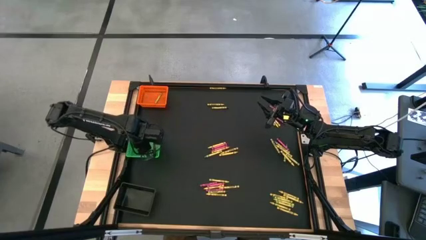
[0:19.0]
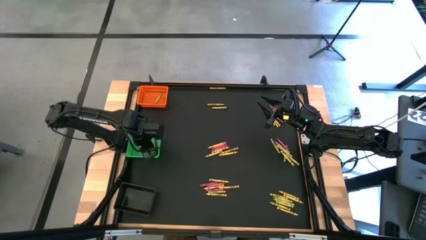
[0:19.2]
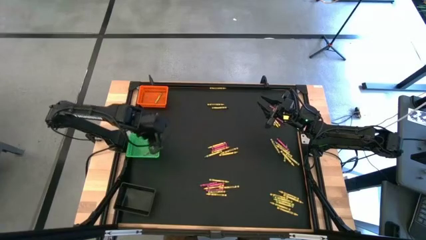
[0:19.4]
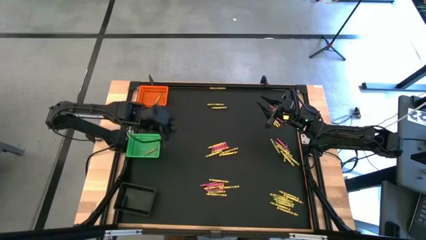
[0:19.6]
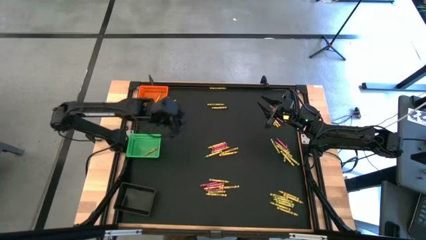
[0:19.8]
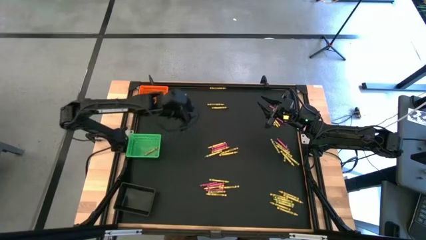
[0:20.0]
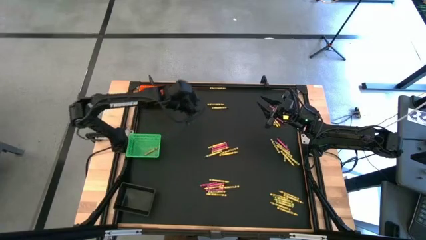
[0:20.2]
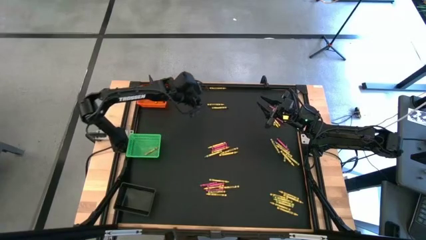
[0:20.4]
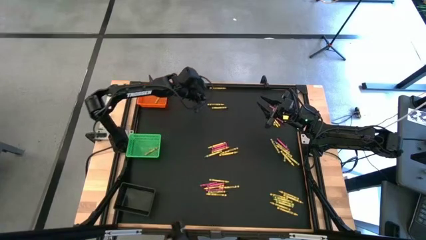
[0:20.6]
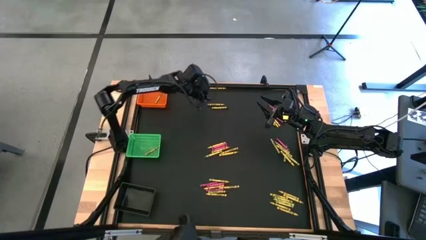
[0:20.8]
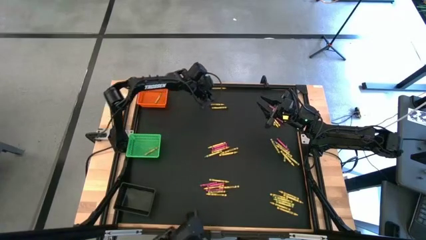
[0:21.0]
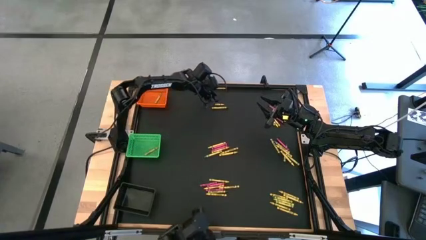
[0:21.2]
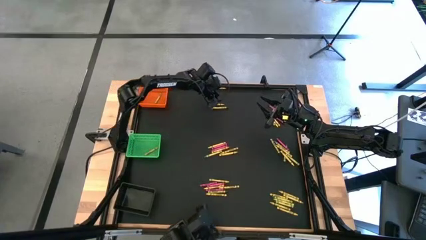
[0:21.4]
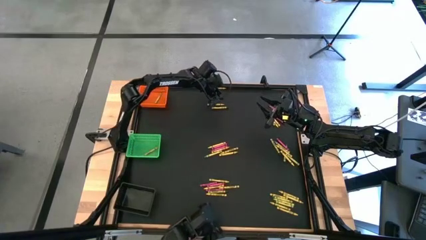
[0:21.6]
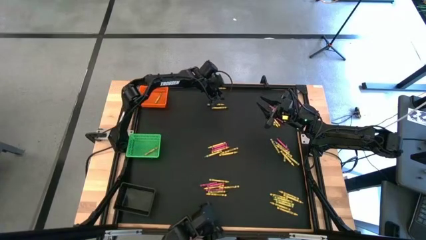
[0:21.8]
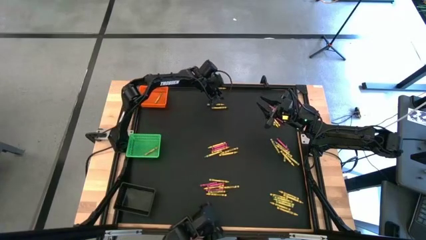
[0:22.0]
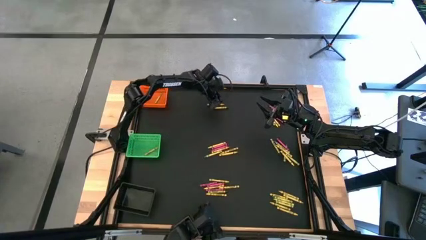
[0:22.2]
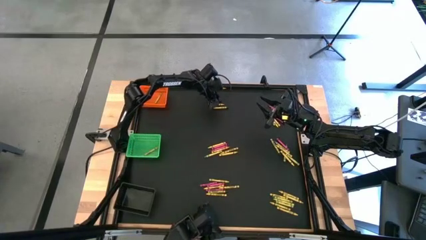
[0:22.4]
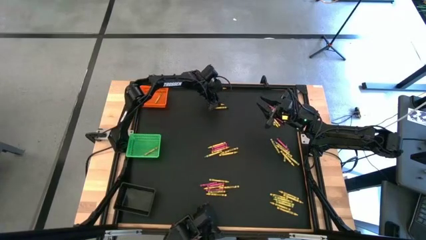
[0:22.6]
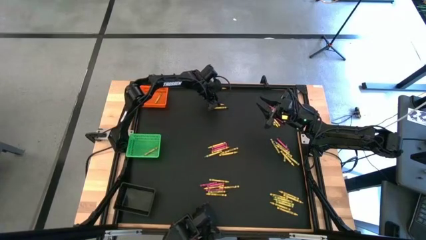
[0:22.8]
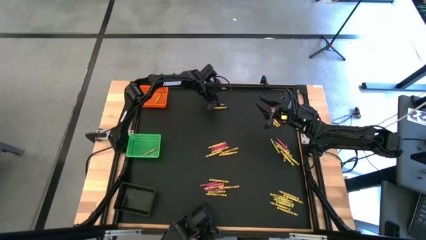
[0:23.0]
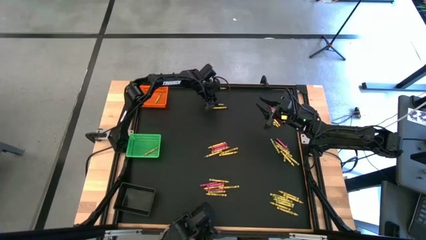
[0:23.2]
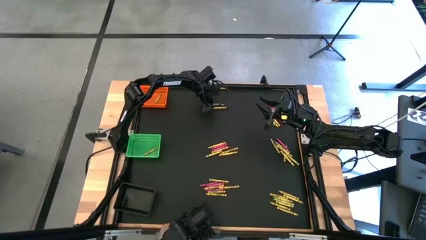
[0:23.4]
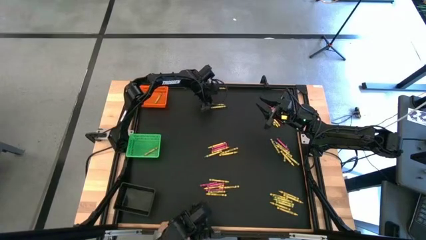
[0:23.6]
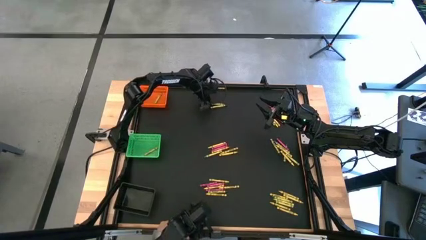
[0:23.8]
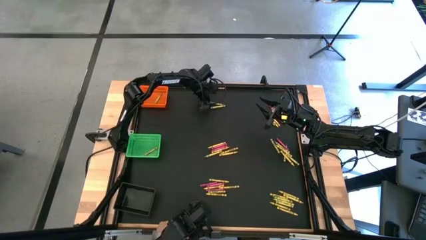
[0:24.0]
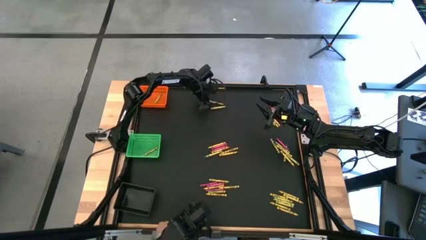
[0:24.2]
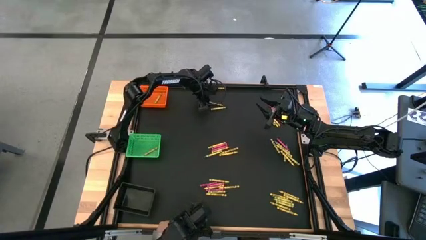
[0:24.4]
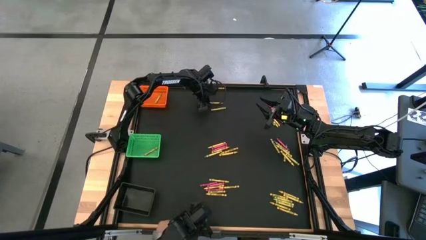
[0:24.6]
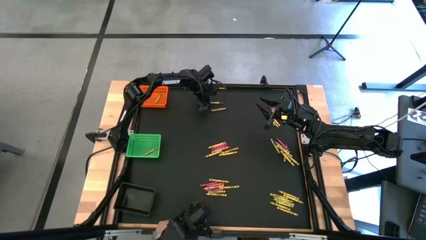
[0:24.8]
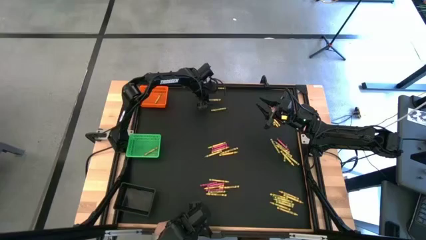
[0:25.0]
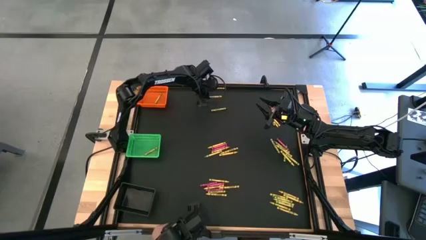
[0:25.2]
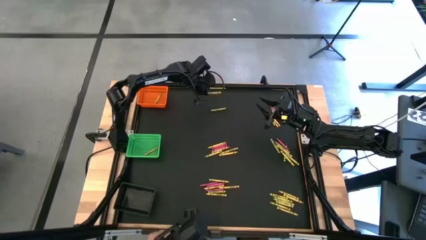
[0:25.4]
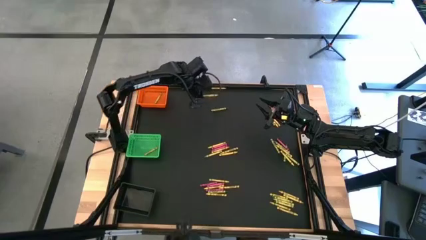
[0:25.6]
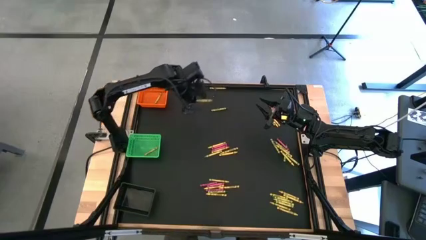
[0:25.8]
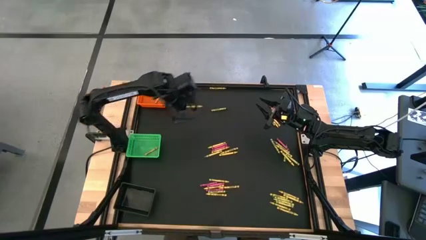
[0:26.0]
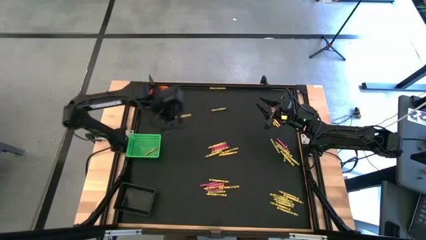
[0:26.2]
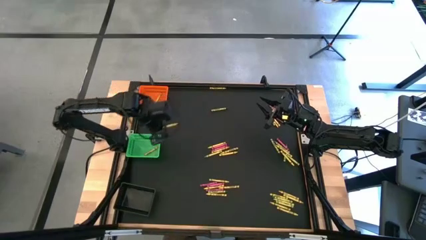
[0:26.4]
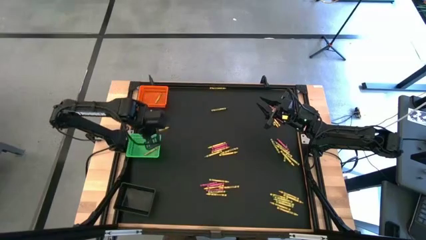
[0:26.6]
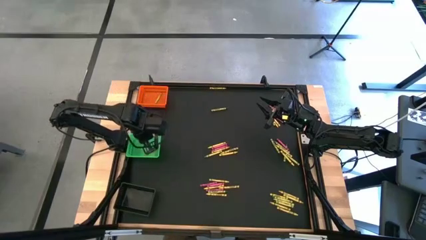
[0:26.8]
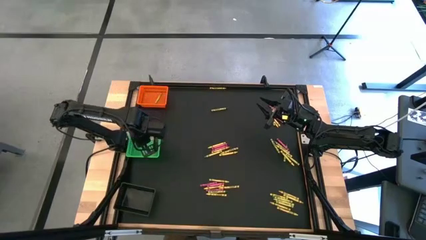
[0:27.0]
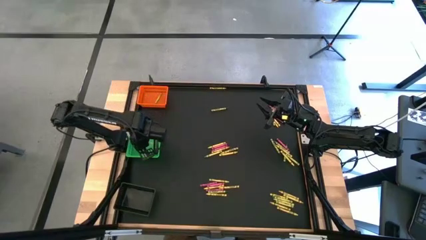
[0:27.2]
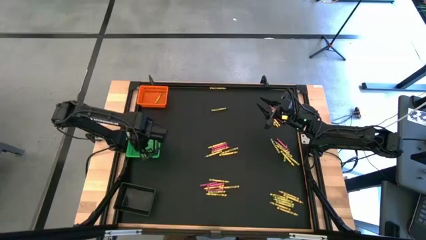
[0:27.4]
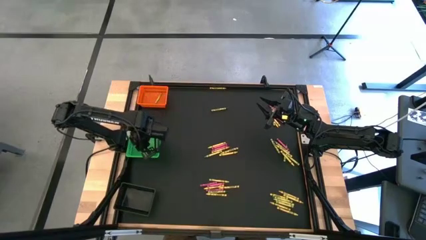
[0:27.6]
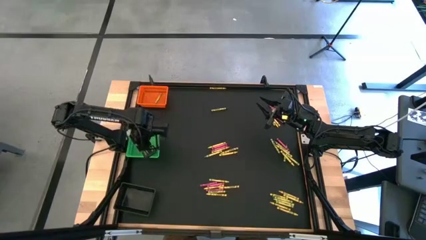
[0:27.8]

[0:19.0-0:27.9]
Task: Sort crayons
Put the yellow crayon into the green bin

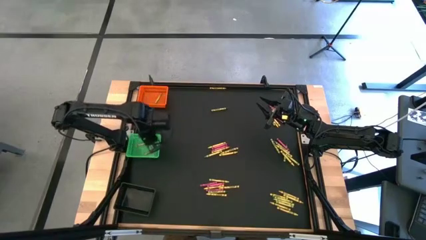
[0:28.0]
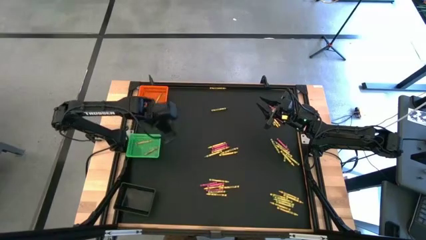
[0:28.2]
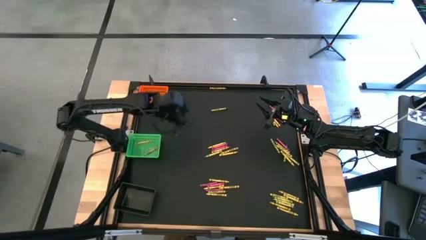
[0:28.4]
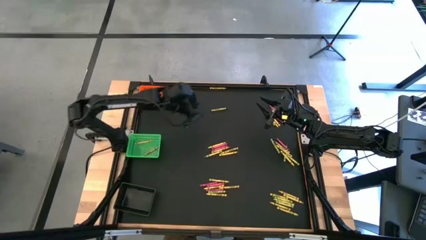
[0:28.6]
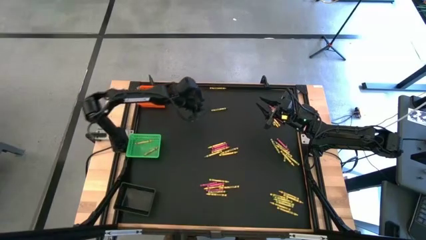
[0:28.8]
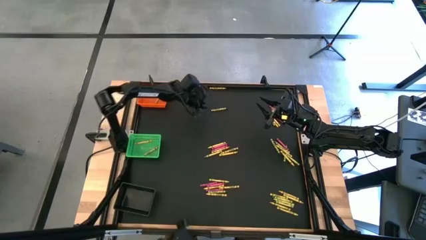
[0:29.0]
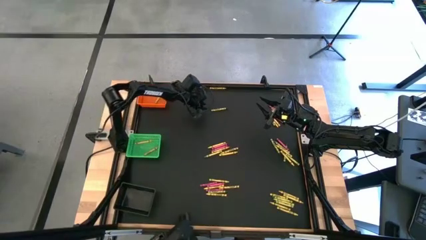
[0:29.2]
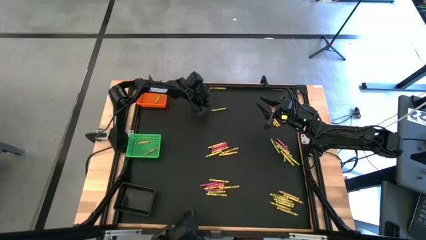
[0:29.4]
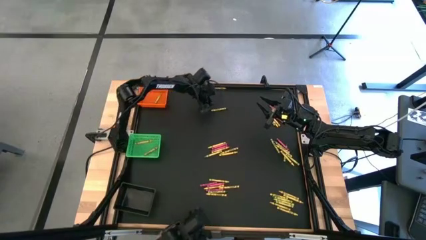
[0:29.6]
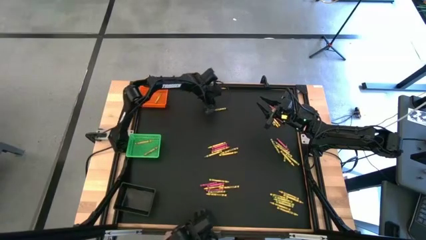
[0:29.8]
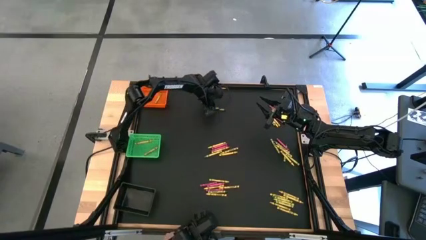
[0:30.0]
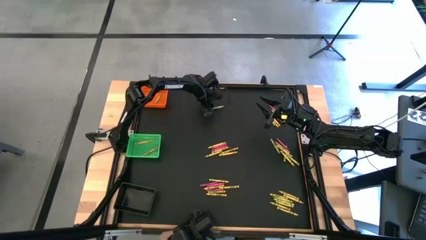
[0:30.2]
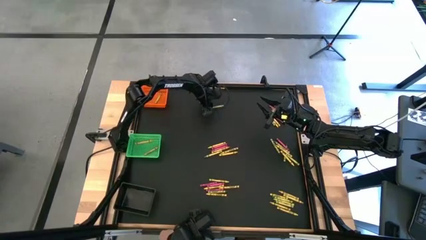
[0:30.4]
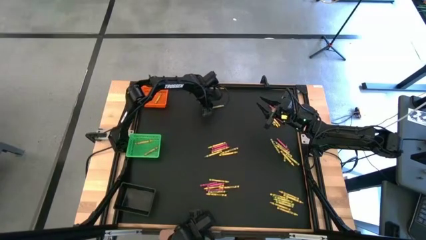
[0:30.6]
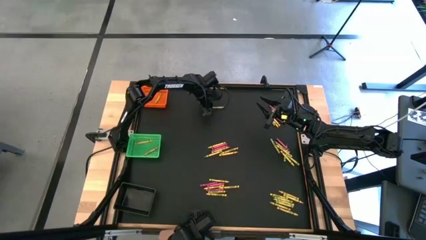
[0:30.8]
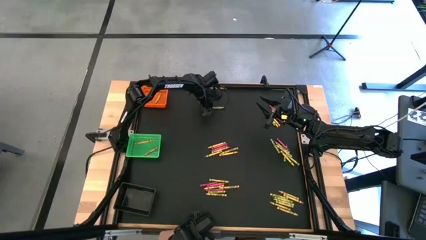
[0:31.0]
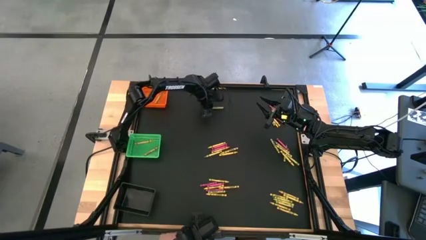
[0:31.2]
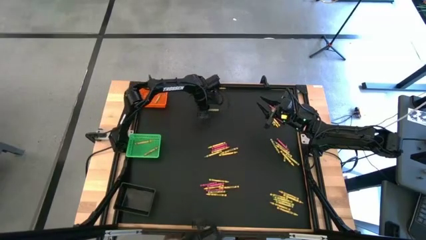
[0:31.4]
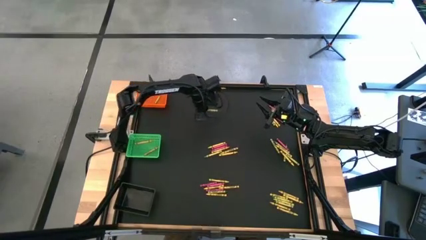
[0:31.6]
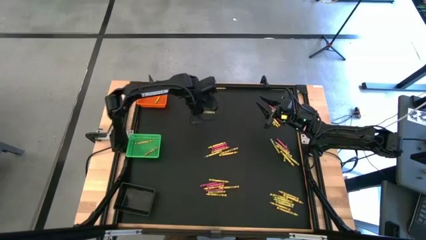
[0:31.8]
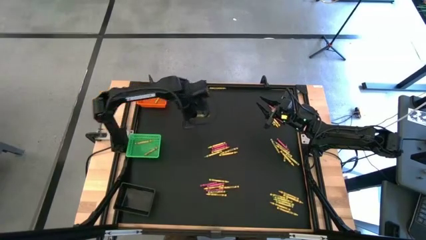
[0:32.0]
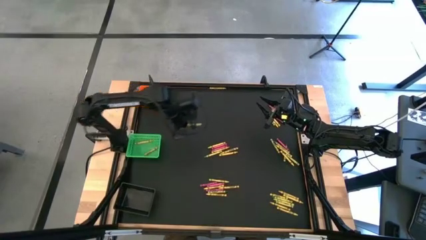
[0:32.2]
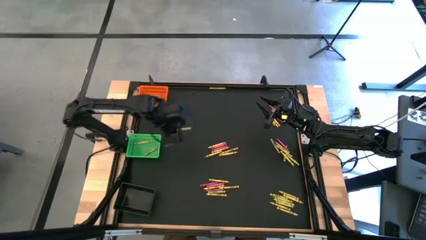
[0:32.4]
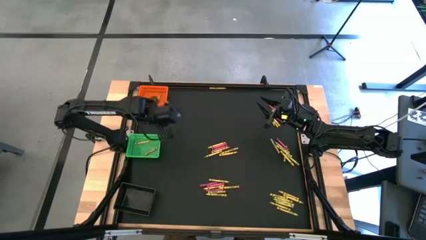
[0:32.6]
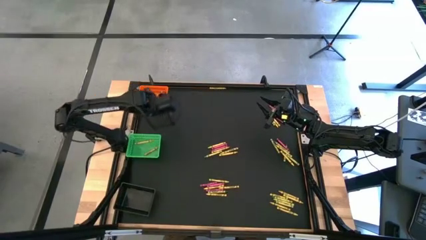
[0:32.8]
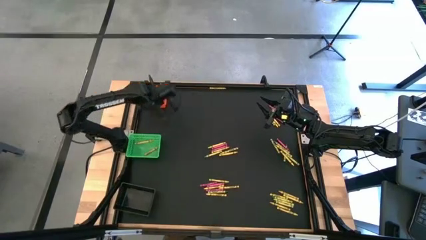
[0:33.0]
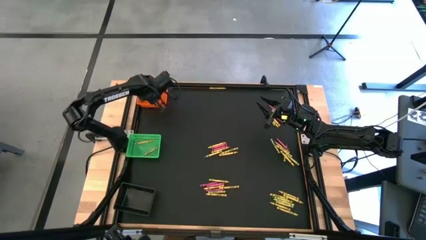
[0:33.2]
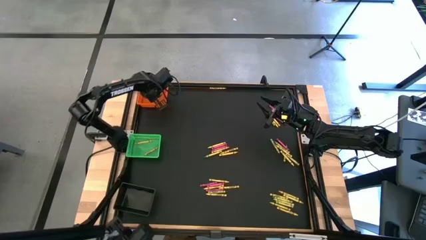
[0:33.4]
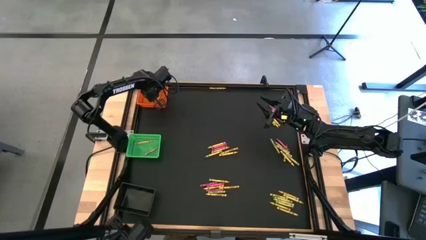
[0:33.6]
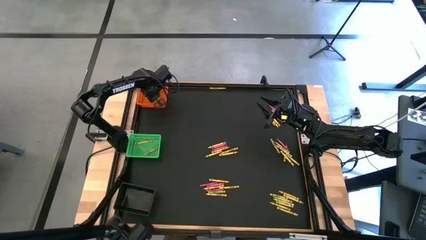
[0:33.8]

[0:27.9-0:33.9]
Put the green crayon into the orange bin

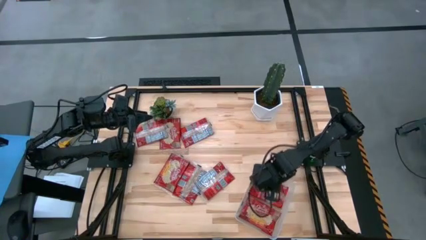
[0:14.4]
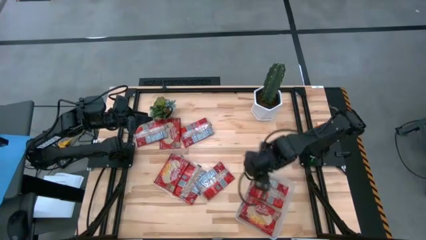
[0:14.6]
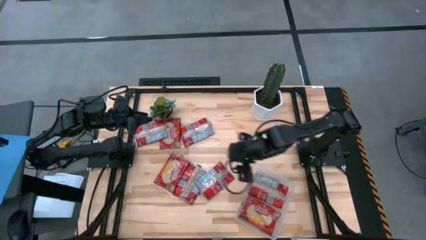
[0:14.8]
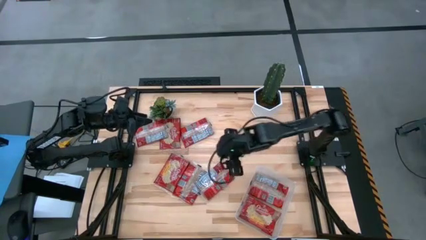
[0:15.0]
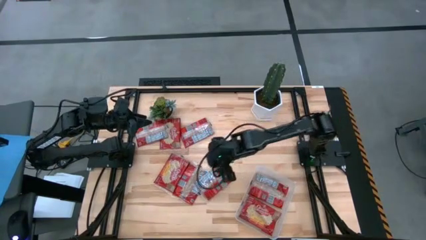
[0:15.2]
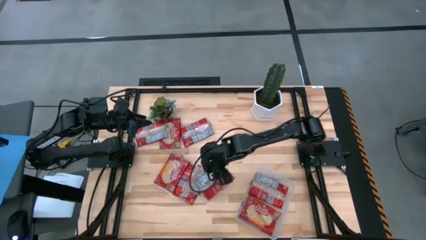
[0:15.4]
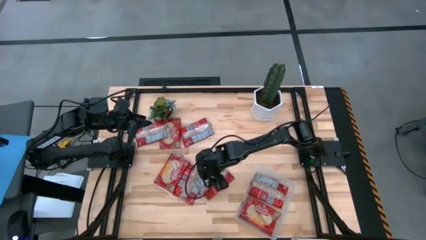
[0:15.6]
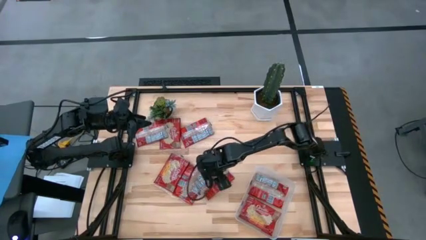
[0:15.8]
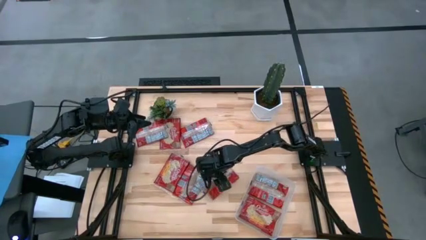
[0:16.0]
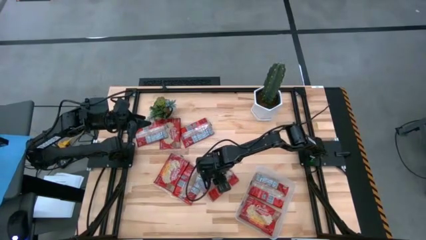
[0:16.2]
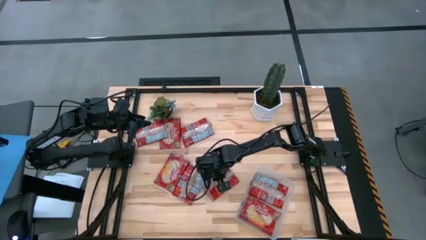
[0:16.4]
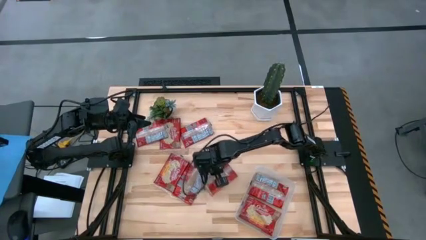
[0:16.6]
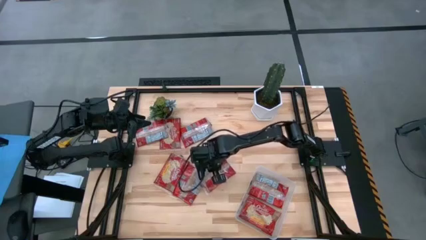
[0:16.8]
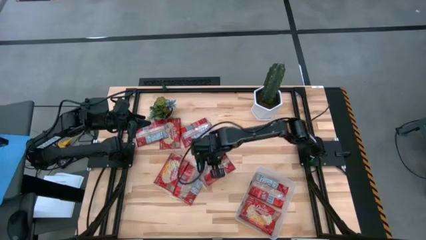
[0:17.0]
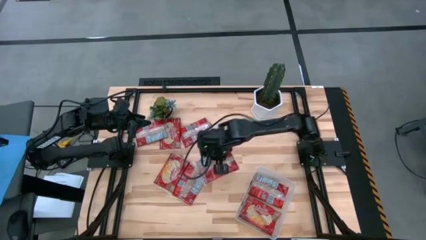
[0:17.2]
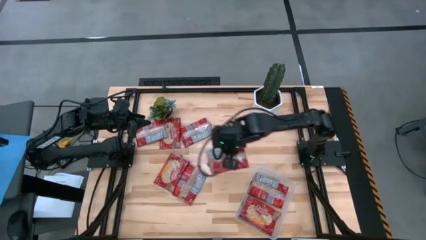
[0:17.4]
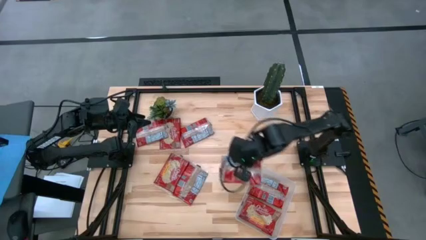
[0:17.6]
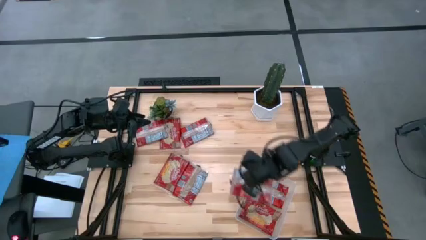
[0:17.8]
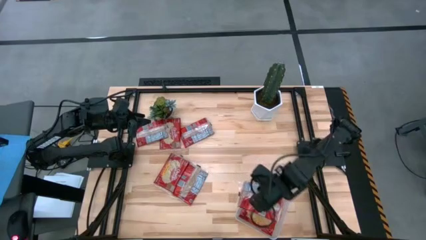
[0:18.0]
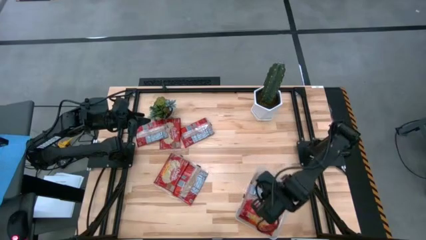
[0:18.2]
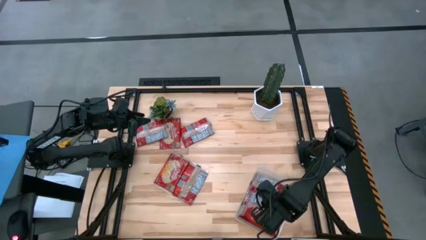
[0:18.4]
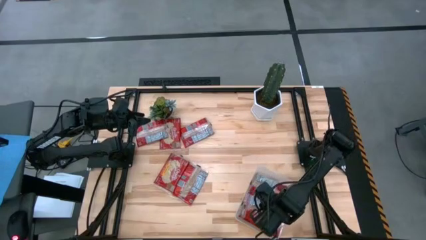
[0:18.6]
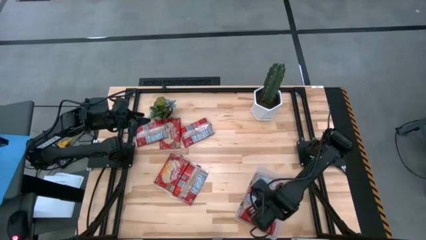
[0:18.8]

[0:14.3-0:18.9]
Task: Sort popcorn bags into baskets
Put the red popcorn bag into the transparent bin
